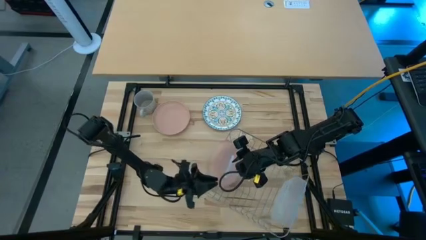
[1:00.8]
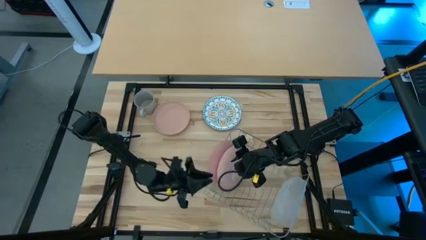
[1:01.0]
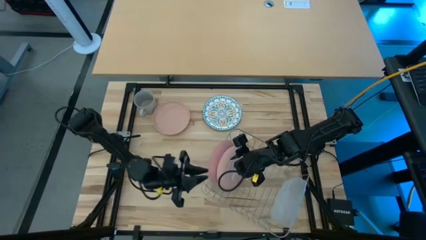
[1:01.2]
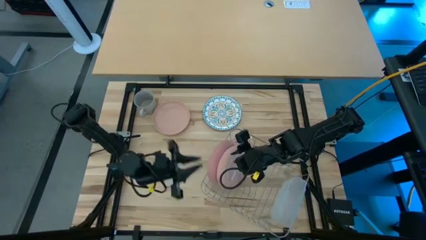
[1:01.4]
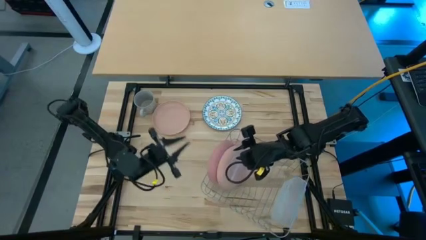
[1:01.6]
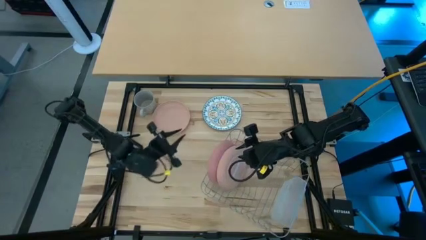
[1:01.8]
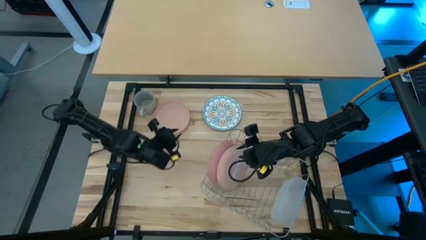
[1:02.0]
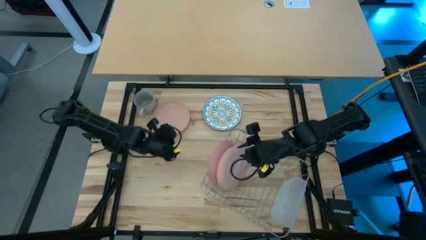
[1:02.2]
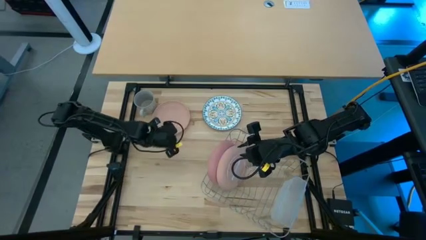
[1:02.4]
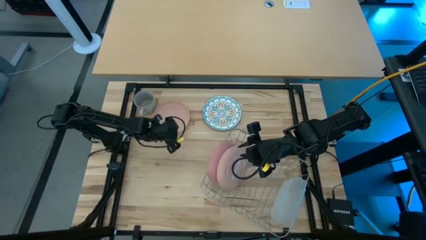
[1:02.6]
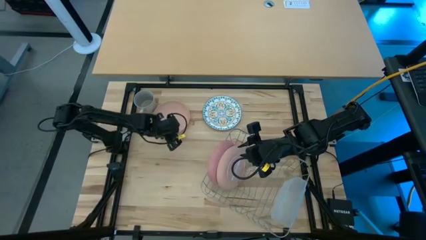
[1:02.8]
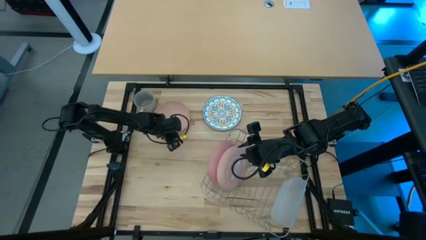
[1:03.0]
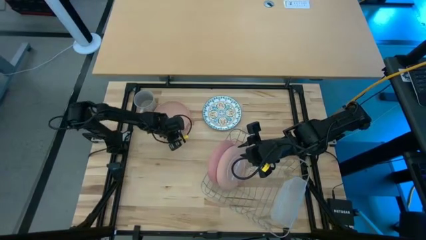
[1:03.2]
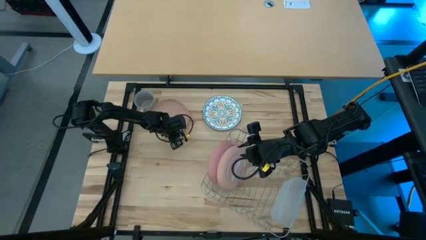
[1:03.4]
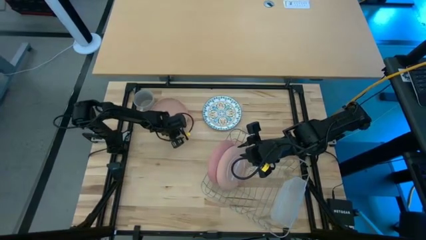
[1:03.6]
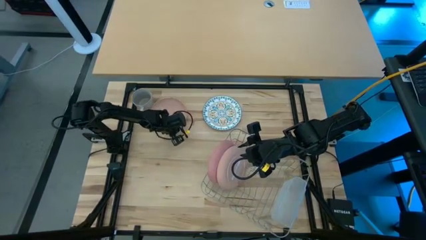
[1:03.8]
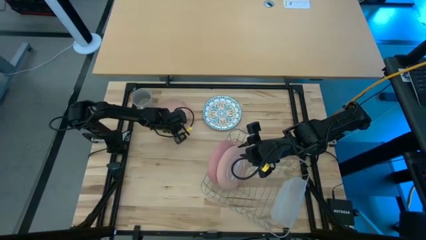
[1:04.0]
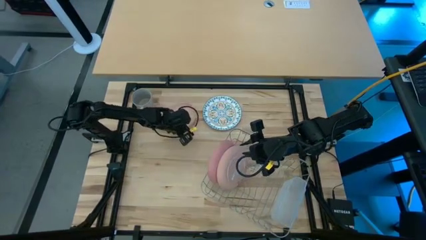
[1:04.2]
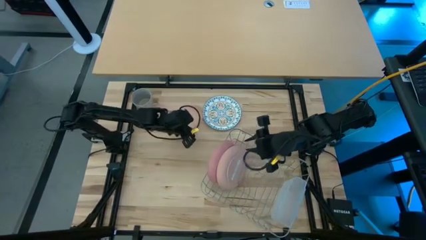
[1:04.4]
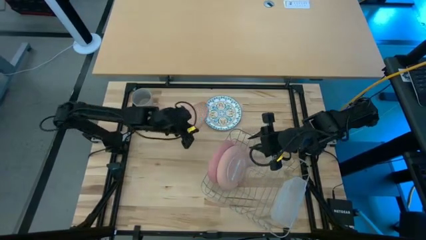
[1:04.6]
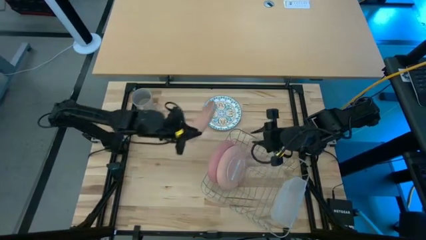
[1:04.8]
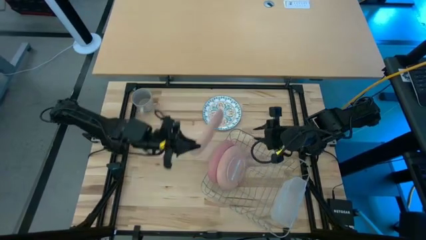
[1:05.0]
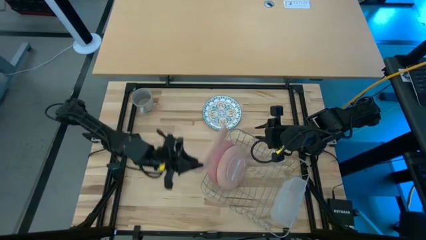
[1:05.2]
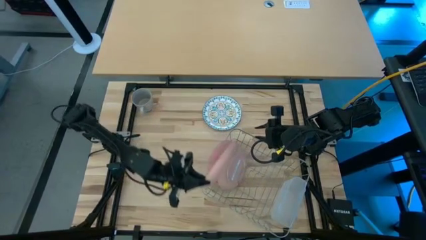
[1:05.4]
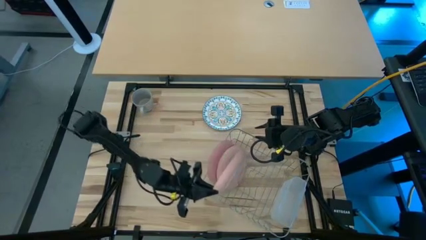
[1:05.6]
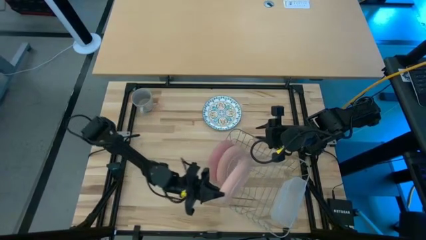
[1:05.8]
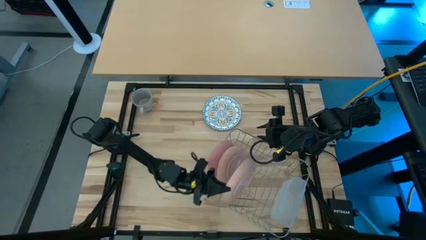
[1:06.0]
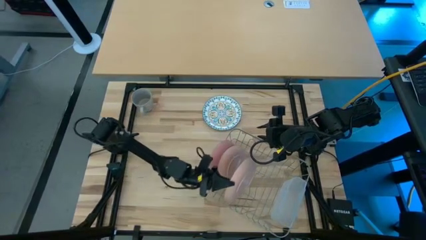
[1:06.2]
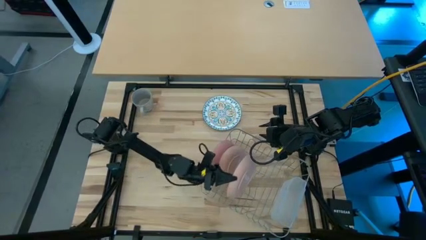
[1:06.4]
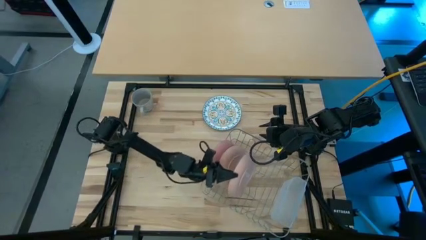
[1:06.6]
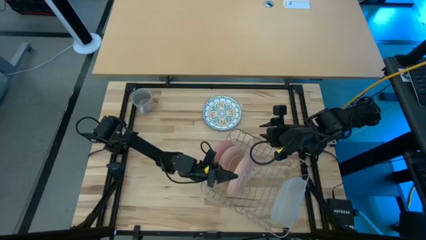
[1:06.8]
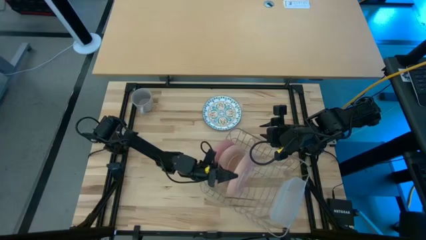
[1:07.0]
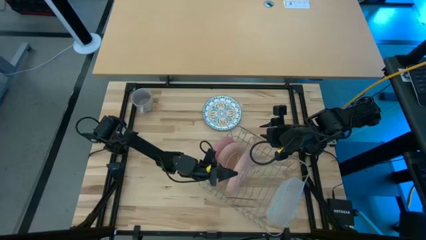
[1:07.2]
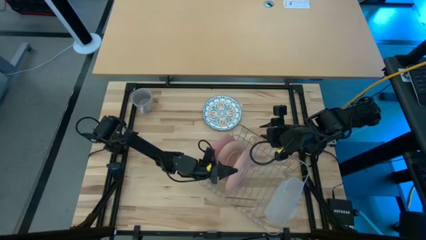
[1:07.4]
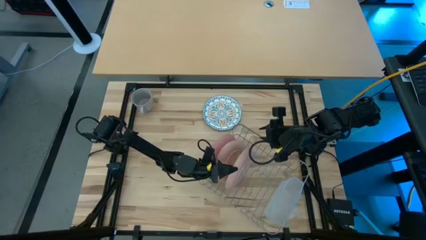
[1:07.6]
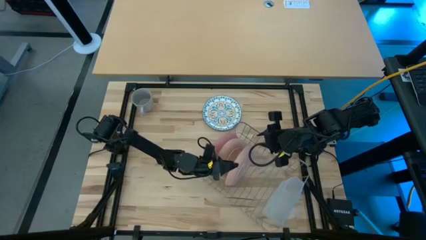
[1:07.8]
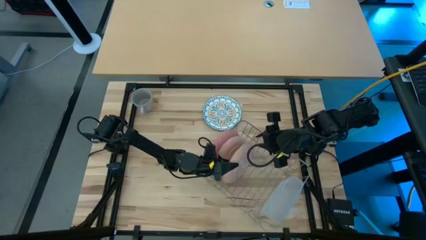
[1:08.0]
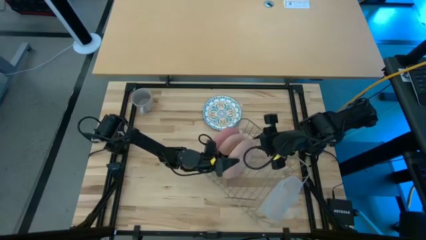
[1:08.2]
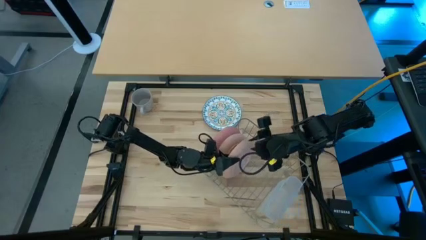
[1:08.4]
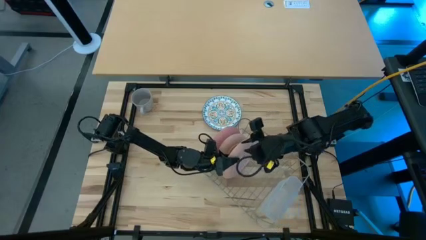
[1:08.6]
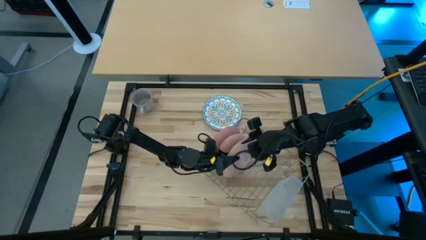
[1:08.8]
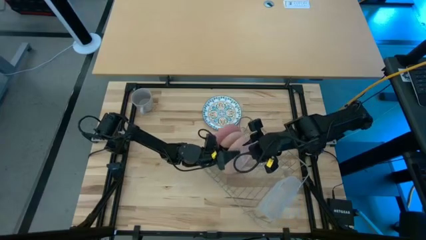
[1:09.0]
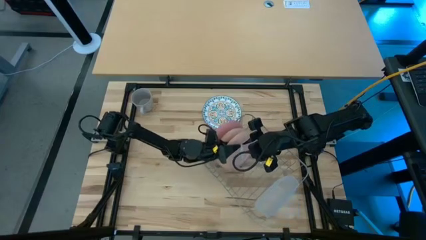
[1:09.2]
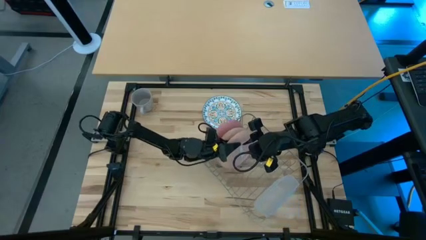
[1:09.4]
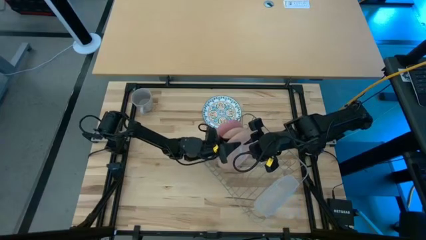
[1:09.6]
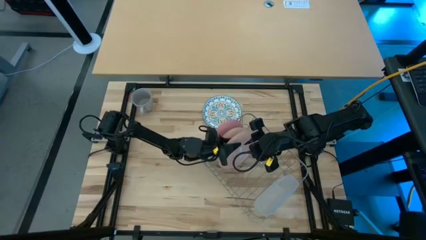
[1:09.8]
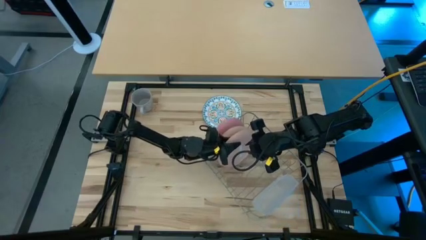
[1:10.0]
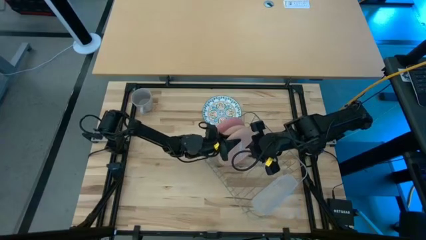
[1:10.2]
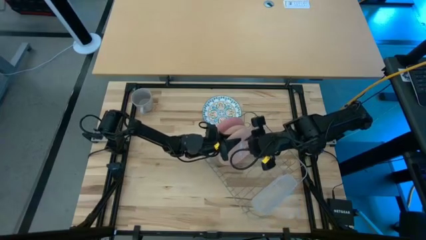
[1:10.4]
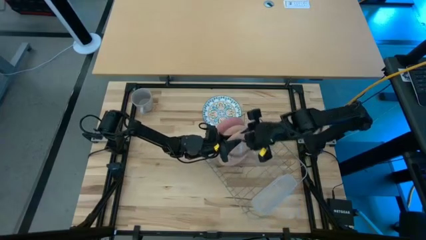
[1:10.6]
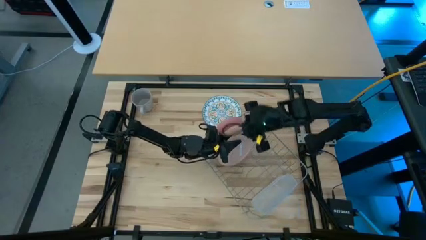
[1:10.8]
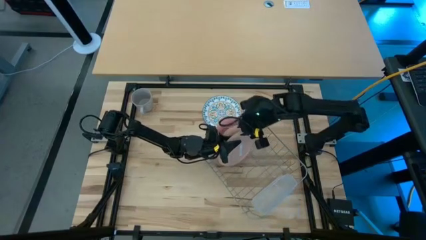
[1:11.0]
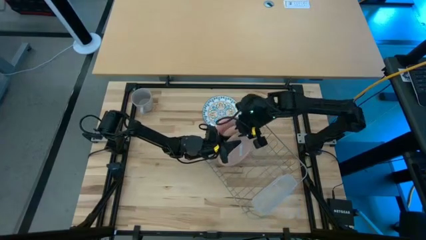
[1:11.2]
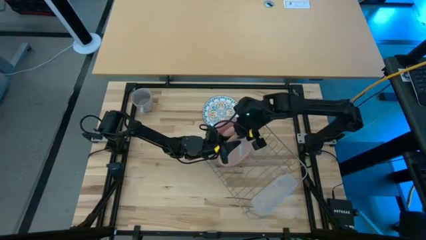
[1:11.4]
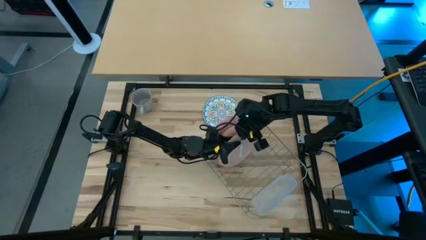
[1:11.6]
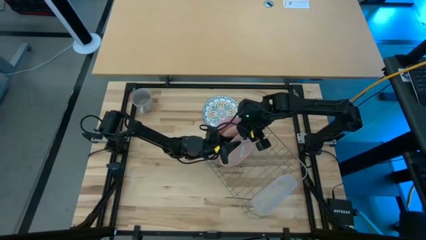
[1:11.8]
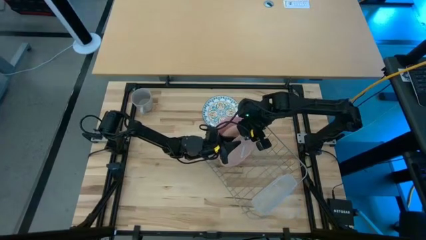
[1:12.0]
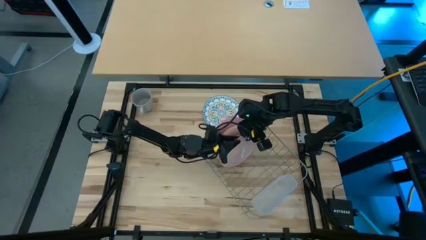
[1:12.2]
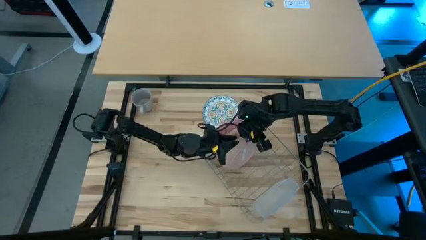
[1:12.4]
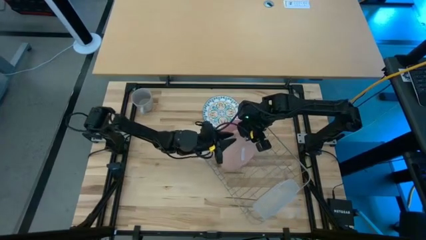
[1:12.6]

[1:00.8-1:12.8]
Task: Sort dishes
Put the orange plate into the dish rack
